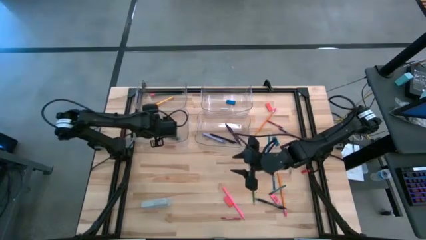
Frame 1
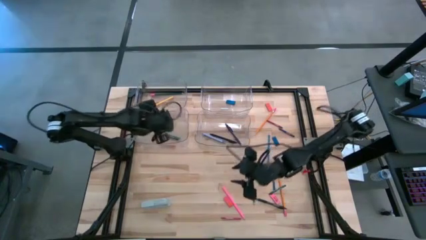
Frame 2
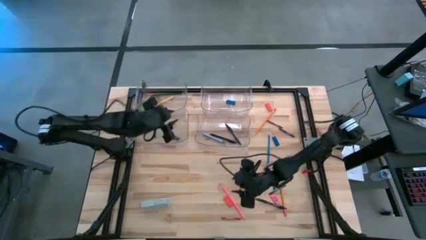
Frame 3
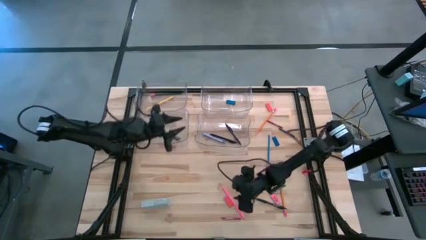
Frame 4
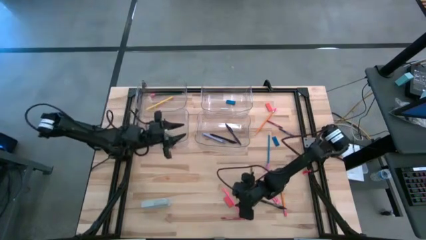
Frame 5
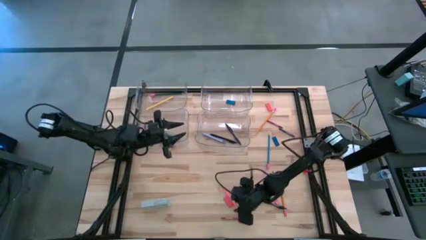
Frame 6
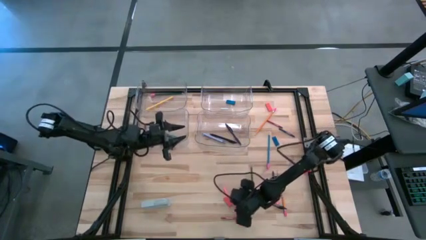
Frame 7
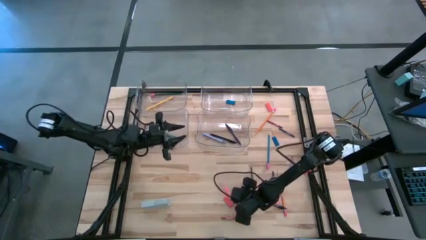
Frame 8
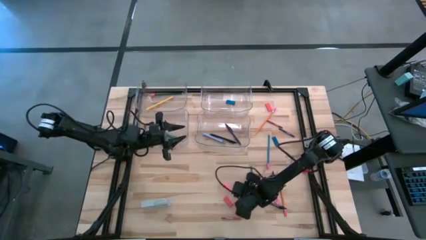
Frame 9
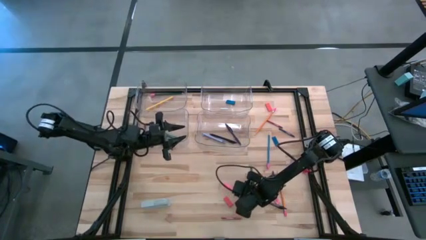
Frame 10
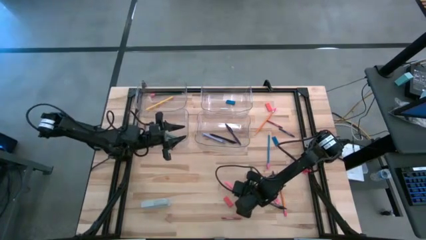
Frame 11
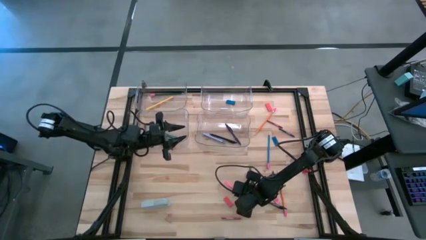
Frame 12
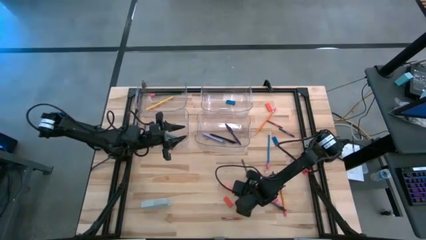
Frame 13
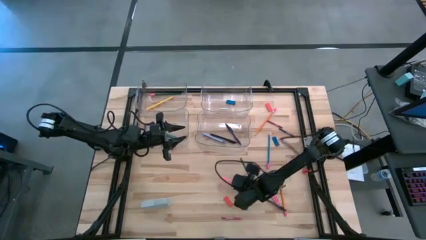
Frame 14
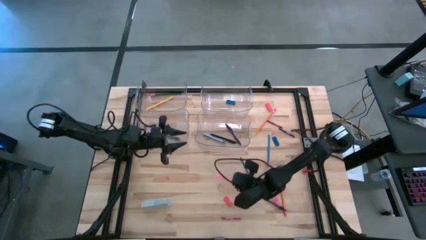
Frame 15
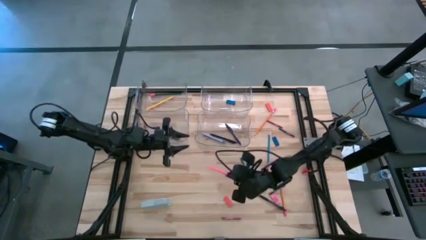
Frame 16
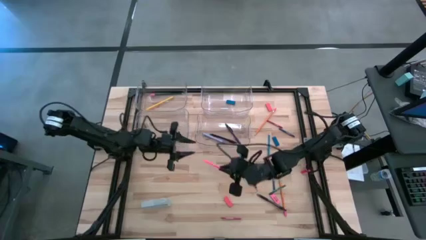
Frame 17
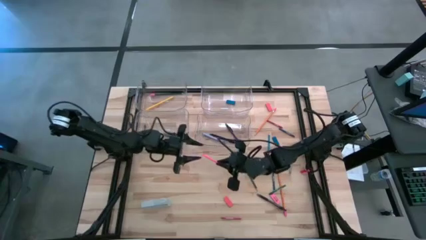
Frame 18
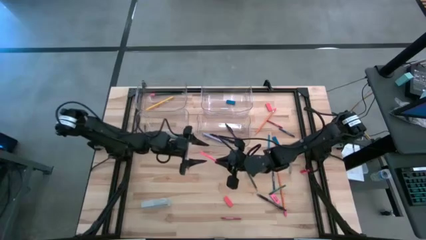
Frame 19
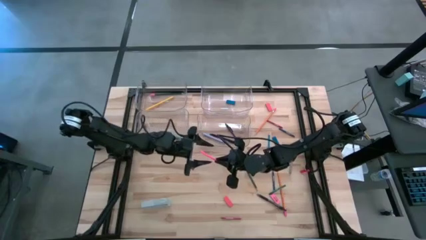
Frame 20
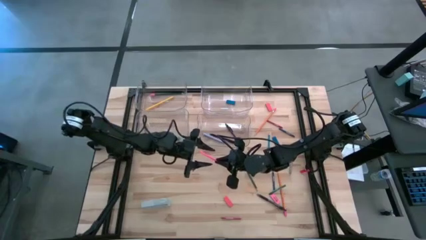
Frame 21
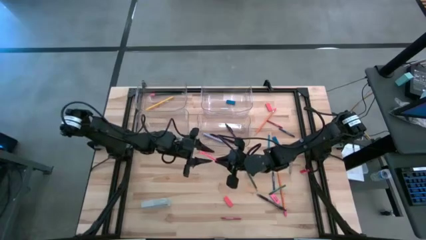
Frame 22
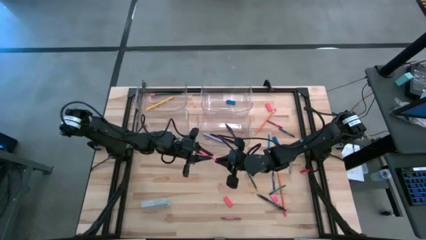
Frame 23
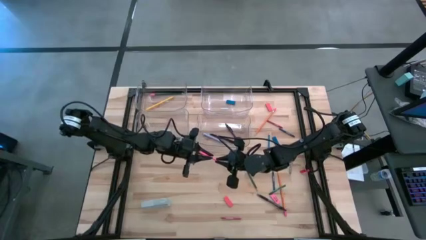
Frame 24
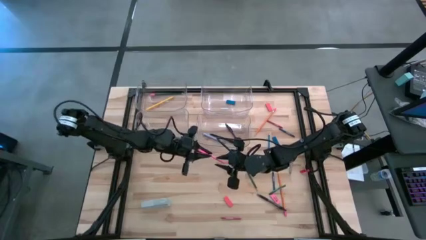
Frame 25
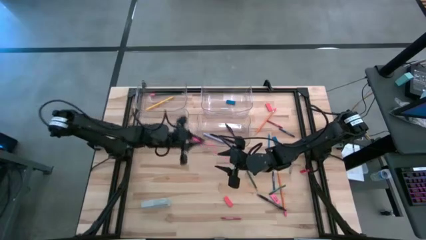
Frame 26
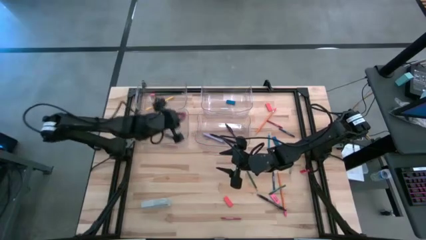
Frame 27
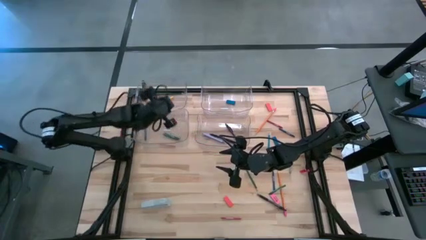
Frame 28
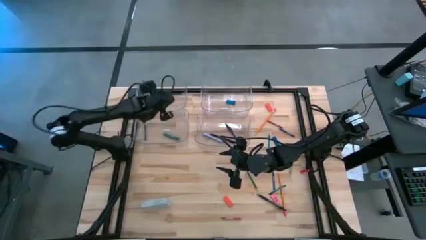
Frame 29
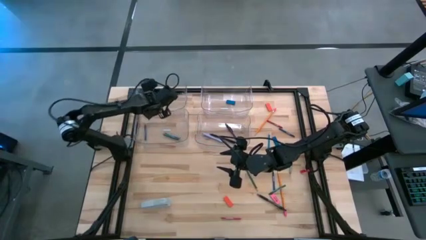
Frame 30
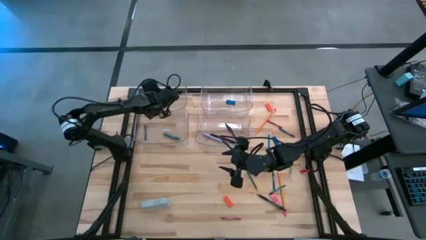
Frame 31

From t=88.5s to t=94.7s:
Task: Sort crayons/erasers/pens/pencils in bins
Put the pink pencil into the top left transparent bin

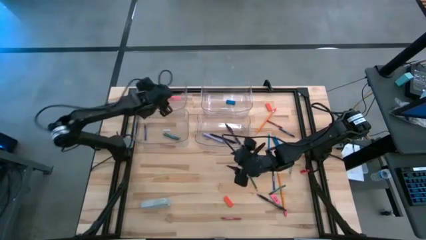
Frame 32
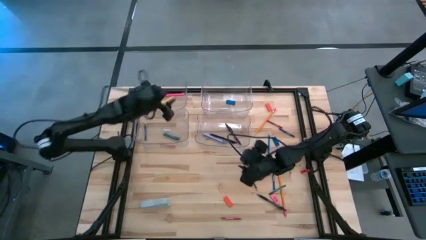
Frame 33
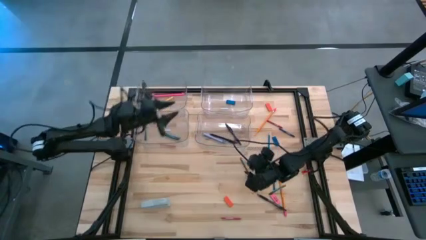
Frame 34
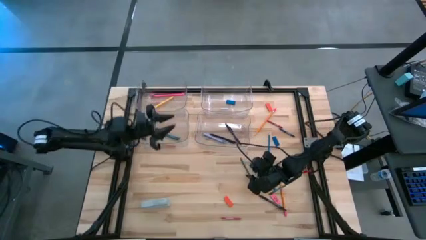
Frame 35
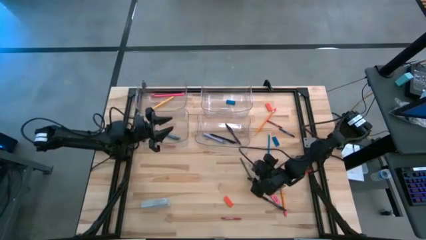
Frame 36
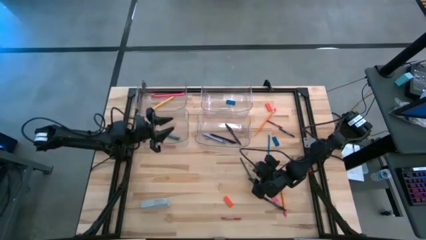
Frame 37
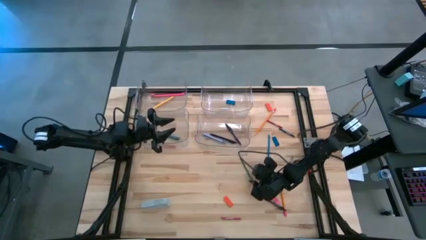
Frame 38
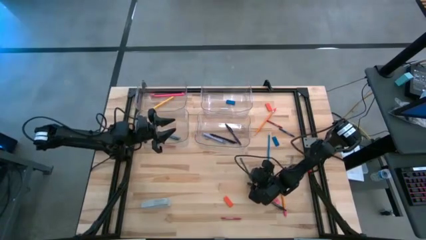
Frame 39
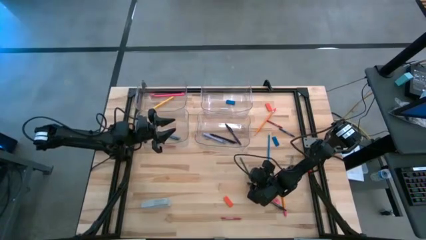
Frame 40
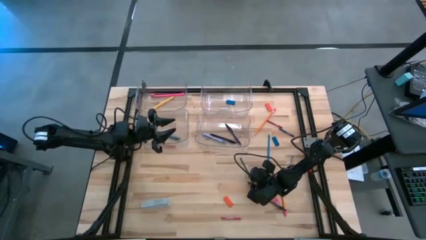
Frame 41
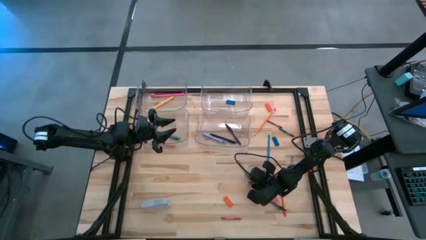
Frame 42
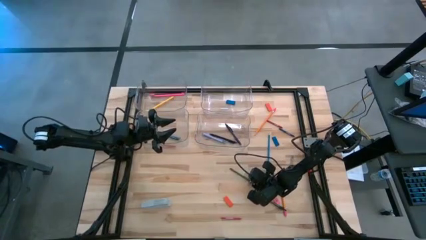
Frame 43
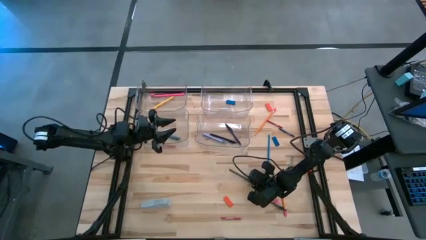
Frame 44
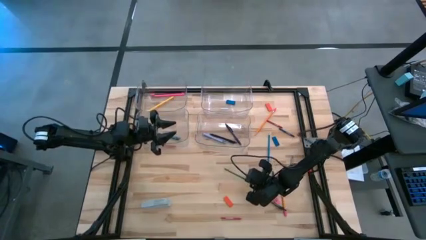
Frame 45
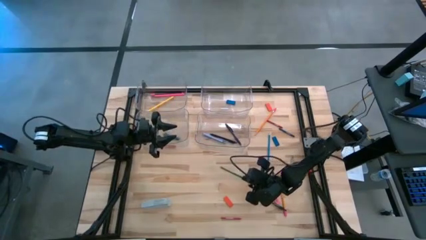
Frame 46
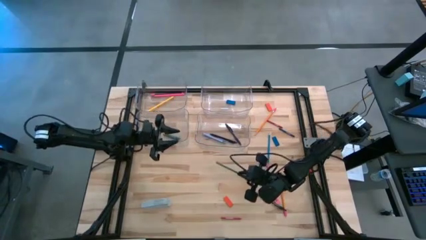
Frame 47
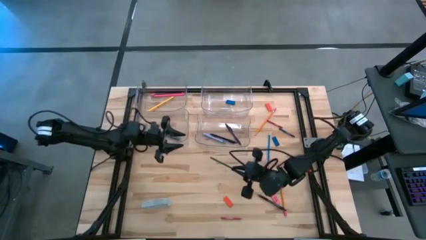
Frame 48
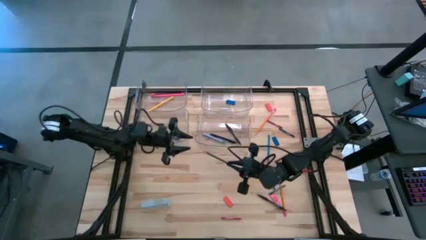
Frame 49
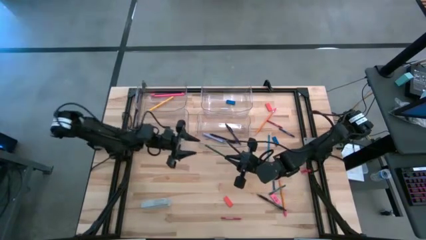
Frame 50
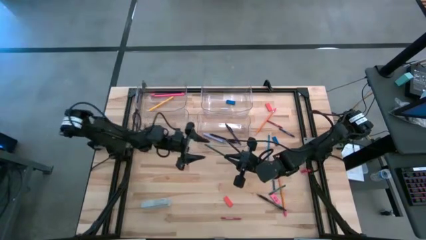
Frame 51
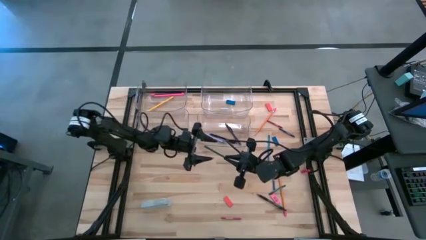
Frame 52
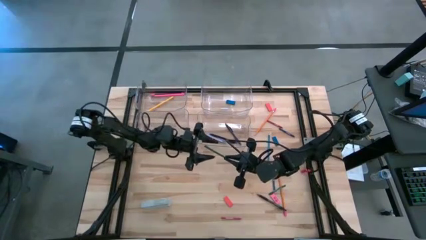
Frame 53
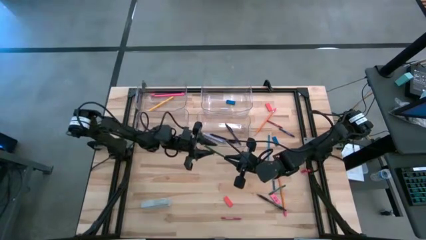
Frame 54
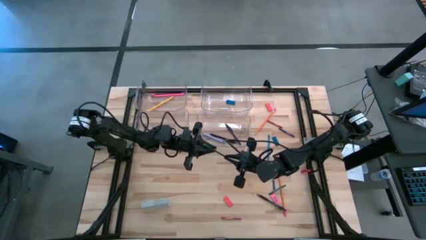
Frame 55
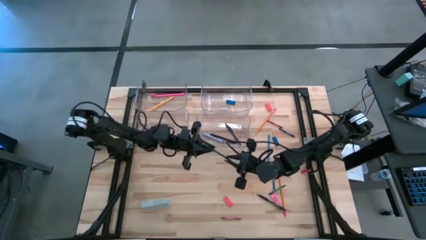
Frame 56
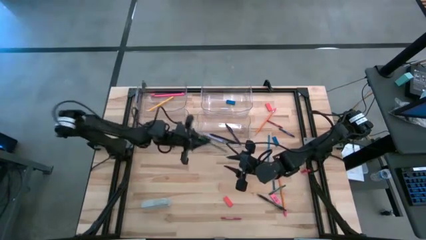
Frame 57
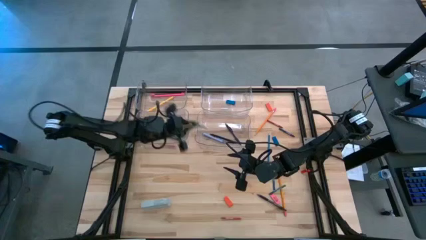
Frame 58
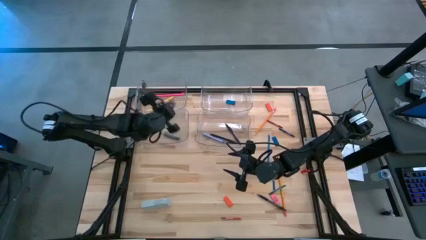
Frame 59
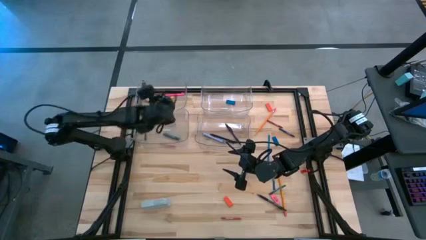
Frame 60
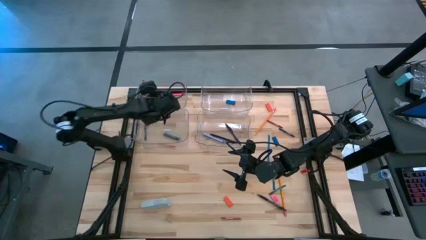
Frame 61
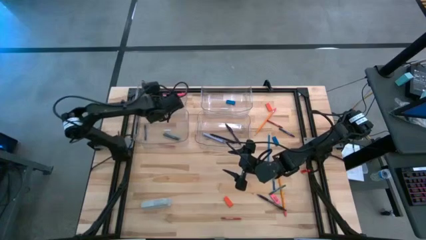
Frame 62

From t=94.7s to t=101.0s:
Put the green pencil into the top left transparent bin

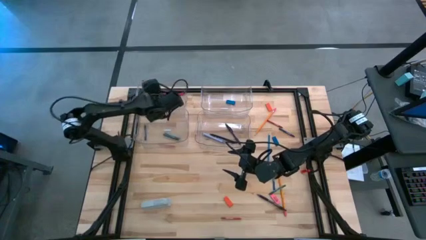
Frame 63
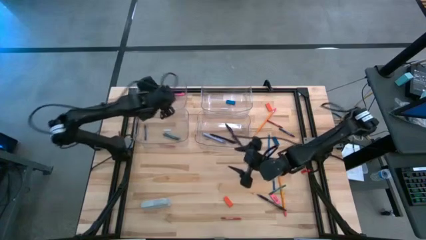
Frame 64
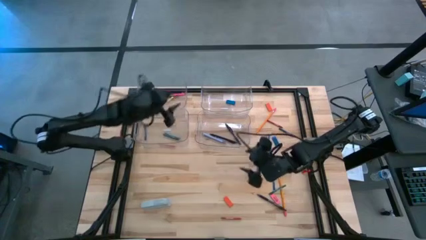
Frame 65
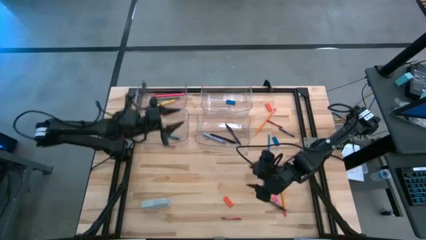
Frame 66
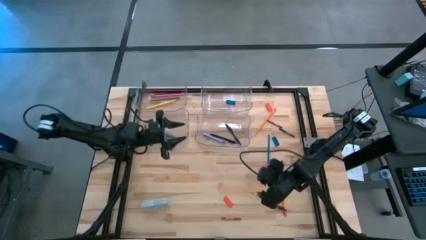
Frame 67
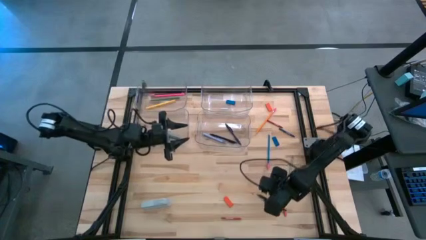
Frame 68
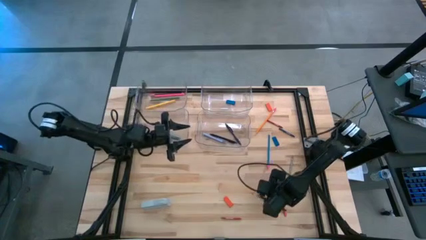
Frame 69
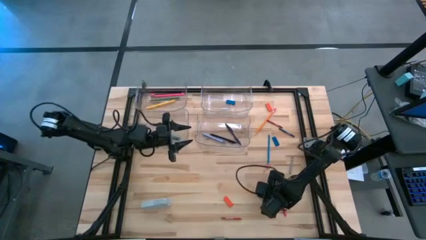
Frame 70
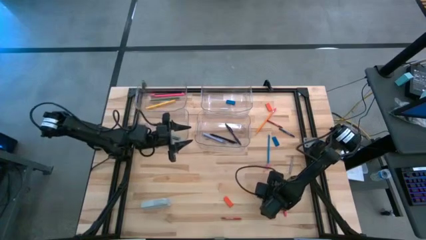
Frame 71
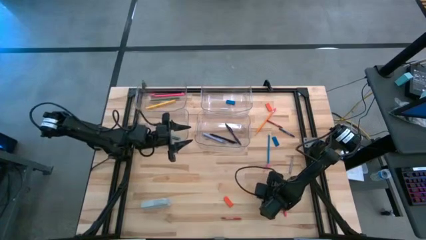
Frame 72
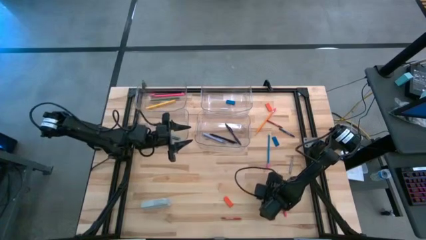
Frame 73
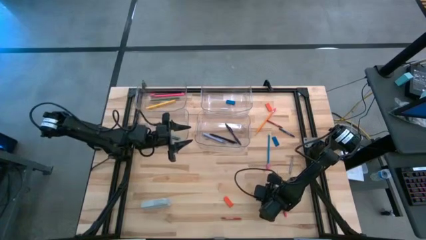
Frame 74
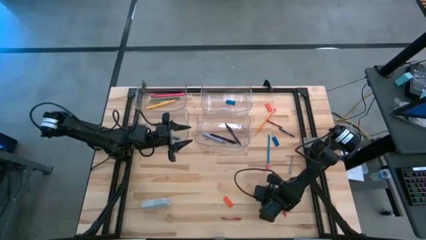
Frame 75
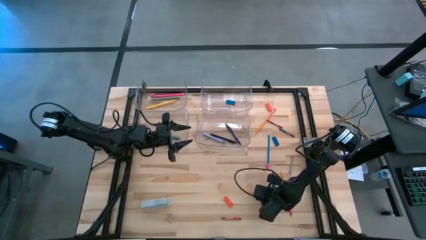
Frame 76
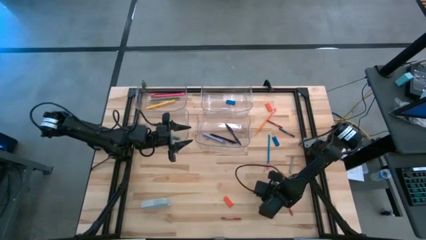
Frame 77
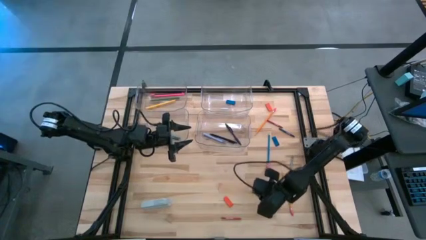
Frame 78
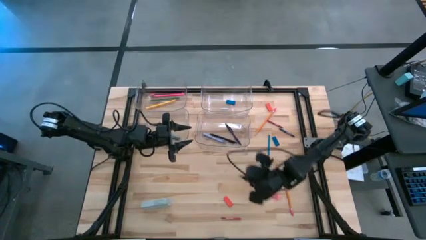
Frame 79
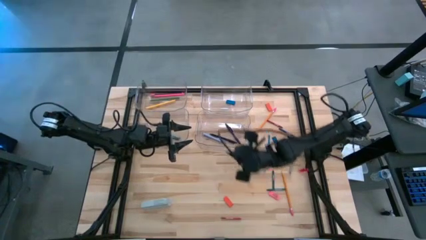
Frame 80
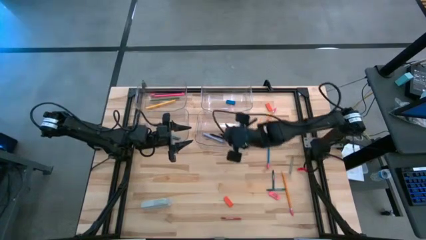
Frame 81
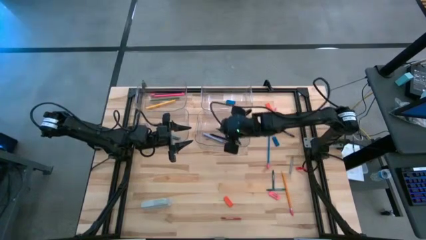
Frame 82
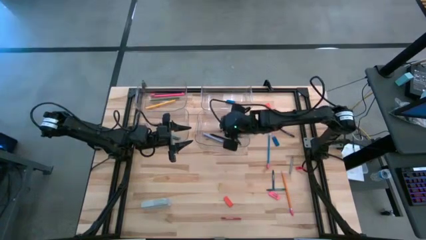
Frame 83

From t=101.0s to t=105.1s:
Put the black pen into the bottom right transparent bin
